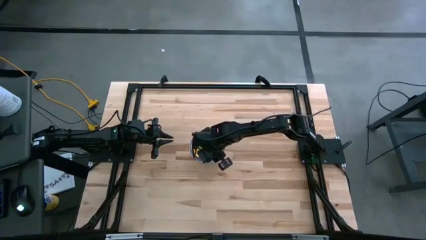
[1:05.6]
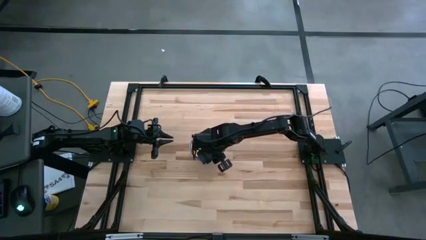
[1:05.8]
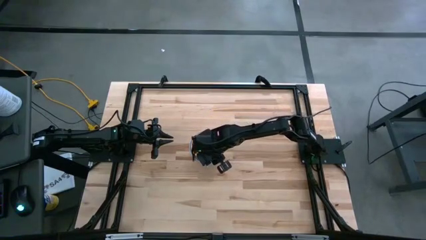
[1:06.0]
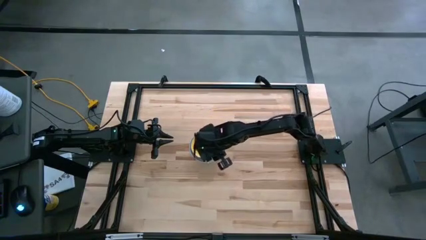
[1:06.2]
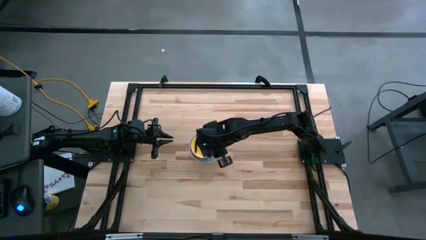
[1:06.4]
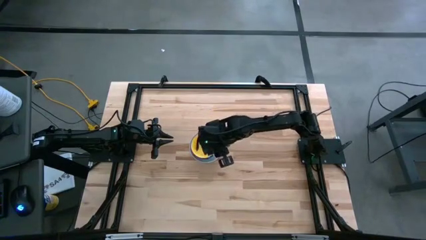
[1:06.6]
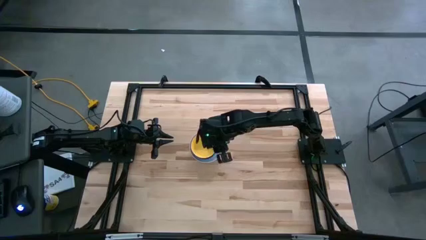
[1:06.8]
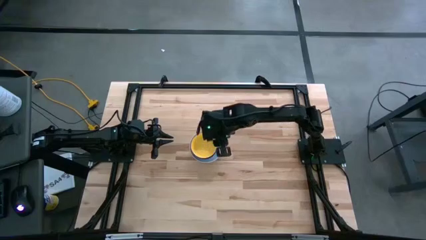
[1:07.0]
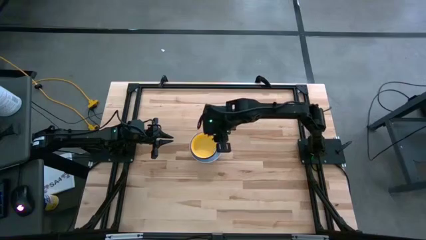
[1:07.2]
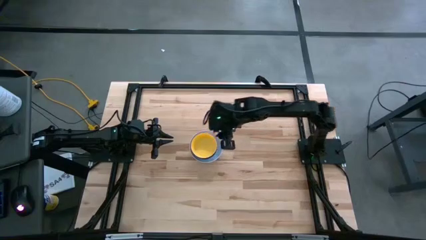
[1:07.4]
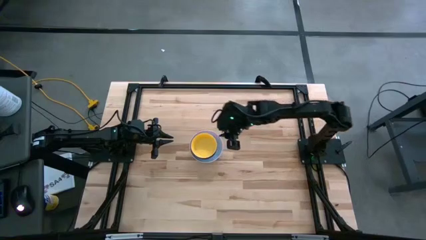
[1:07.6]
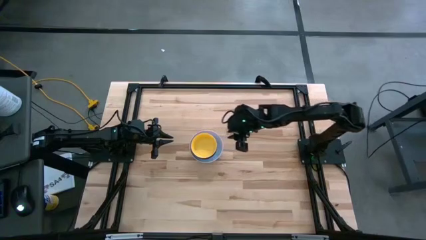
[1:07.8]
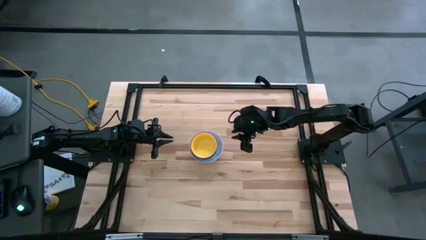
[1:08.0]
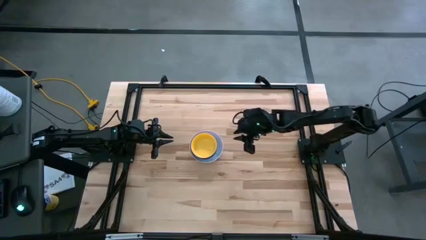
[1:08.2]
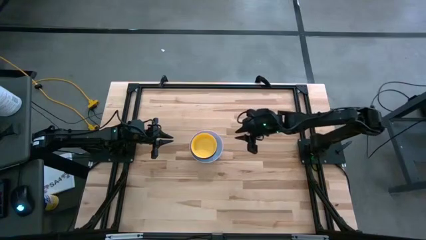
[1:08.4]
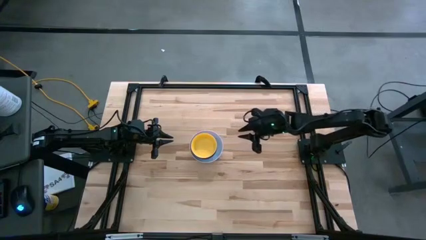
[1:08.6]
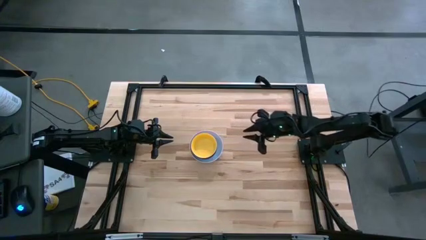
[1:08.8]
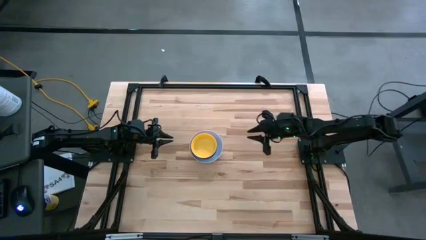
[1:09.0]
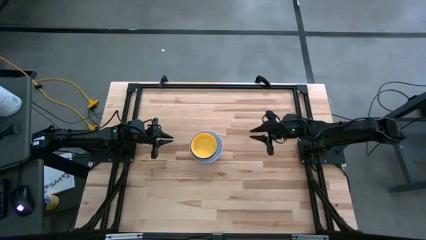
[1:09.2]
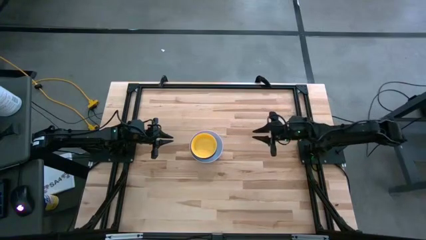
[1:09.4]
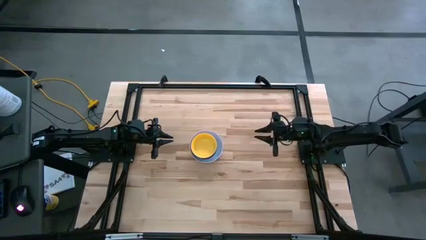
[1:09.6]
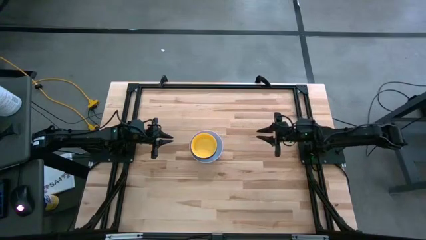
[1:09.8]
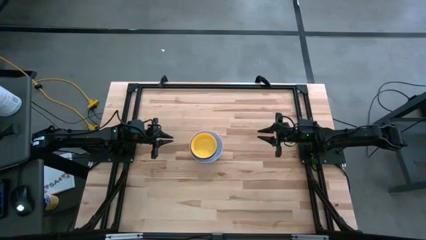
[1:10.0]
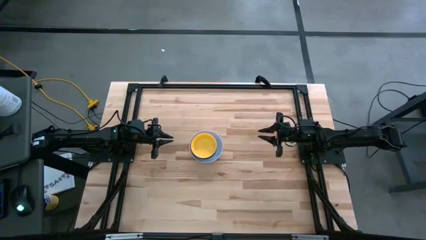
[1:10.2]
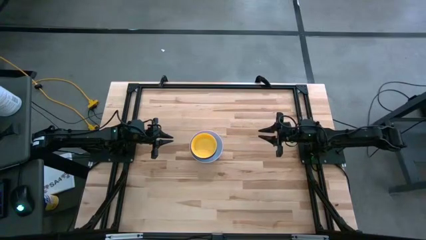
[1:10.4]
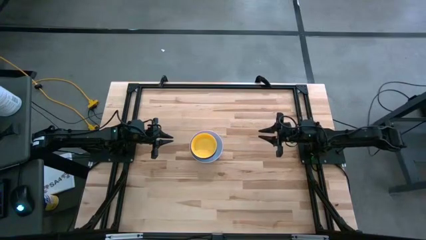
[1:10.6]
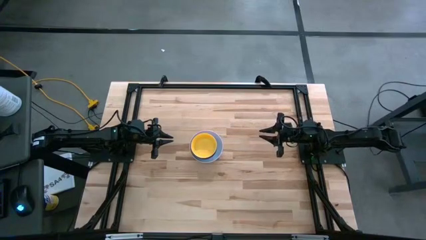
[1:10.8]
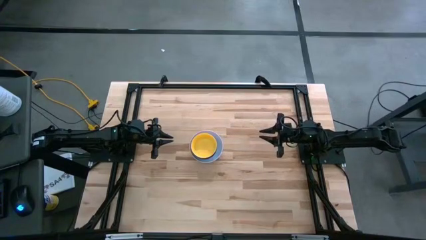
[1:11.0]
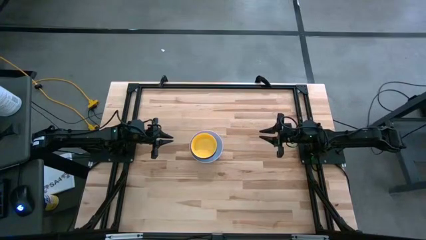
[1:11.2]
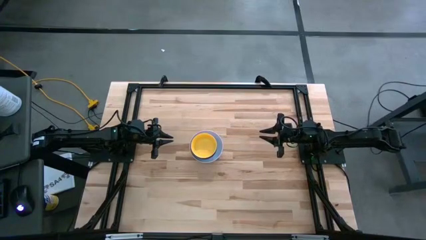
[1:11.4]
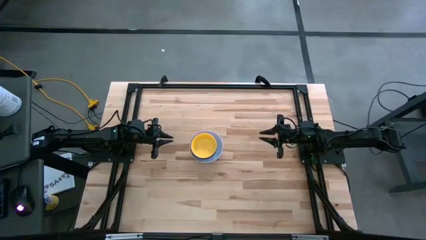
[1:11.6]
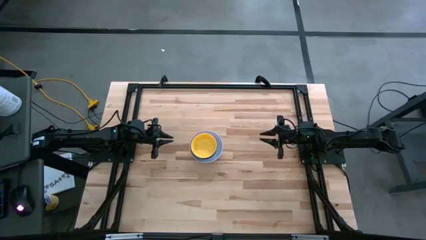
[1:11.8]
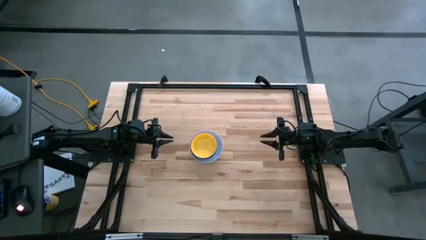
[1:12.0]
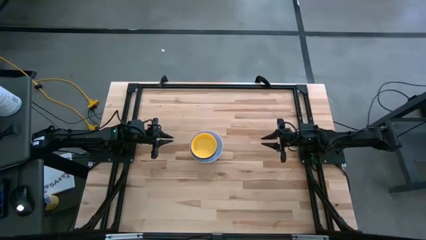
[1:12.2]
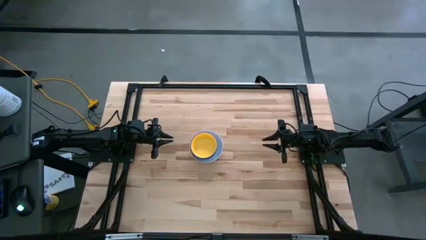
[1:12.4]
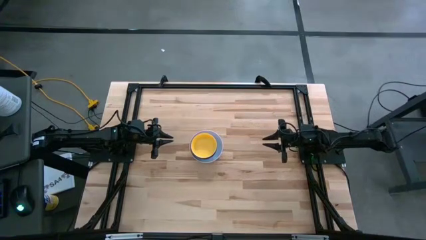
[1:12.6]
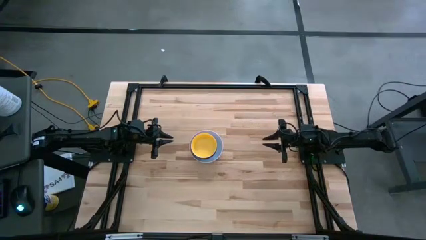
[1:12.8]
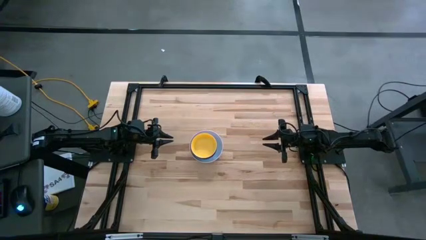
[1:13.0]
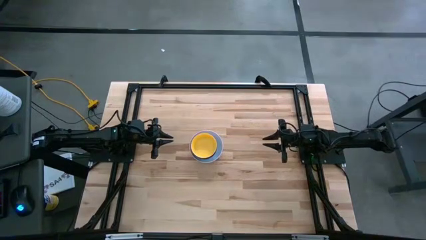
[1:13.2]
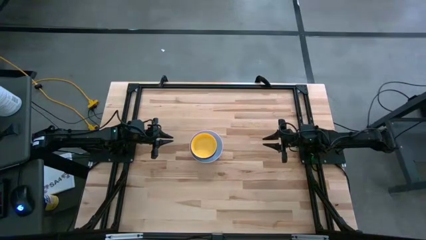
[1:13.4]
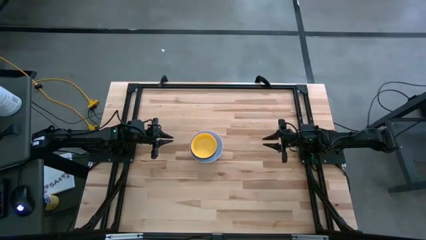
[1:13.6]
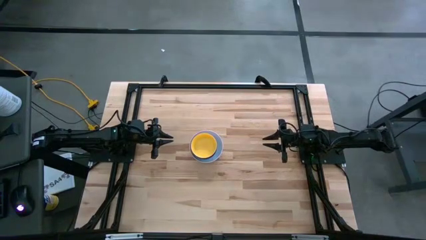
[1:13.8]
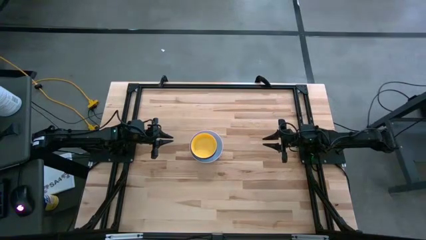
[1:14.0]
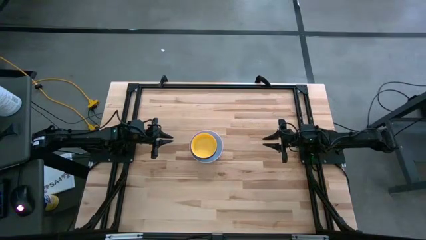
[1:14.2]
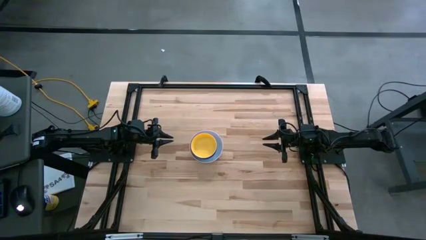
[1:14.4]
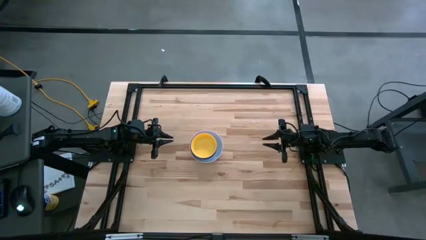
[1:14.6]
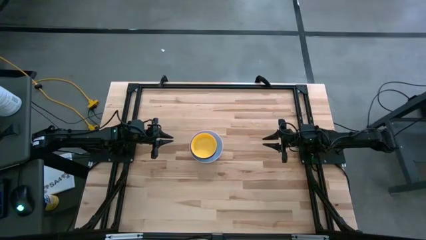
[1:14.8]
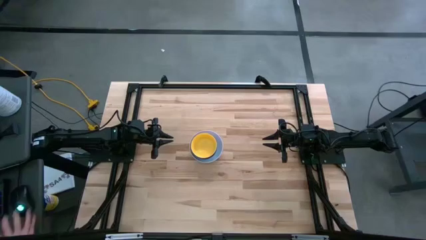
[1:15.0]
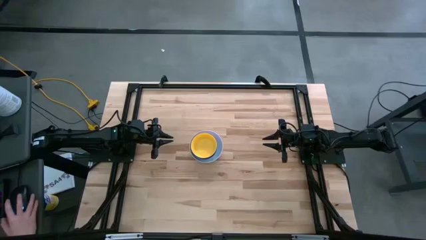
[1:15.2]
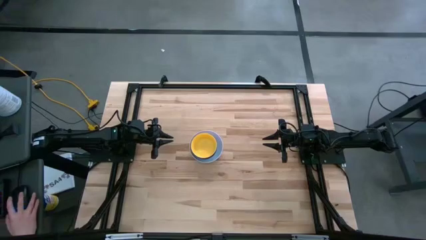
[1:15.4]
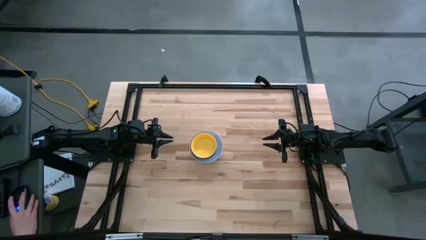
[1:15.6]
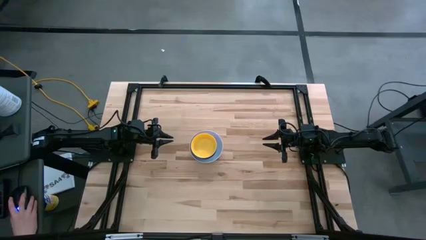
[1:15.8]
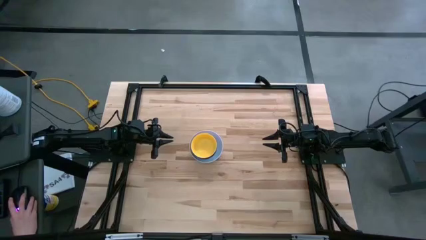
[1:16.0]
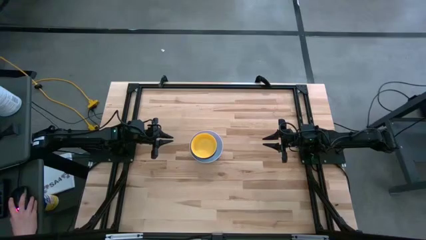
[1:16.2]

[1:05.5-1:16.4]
Return to Home Position

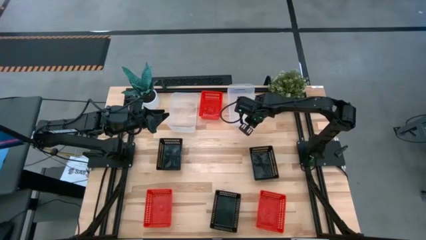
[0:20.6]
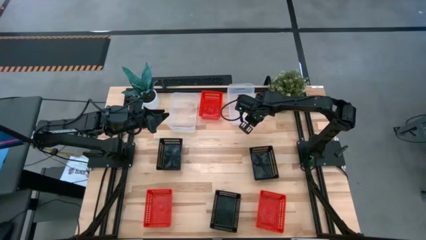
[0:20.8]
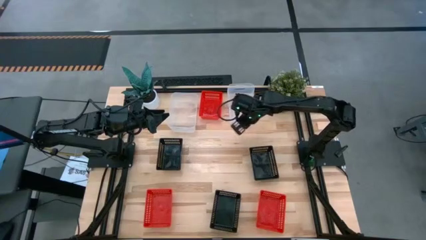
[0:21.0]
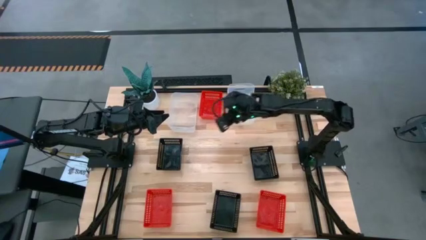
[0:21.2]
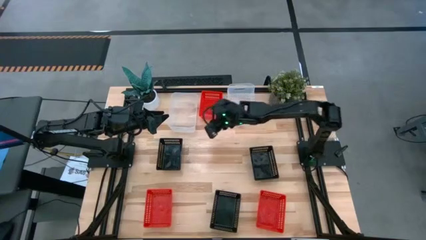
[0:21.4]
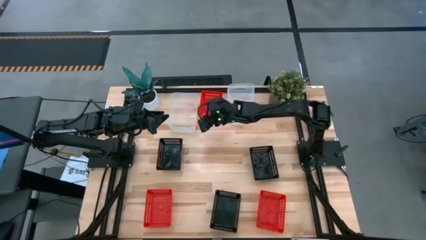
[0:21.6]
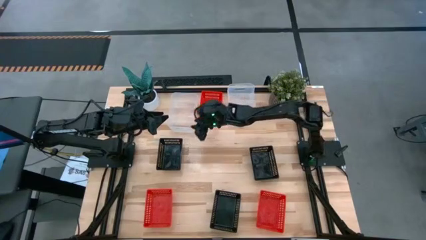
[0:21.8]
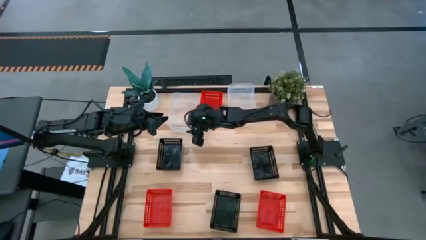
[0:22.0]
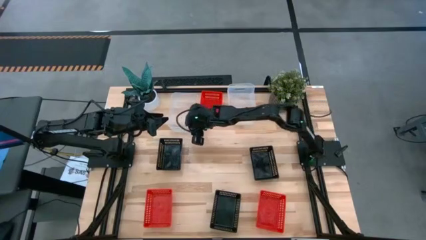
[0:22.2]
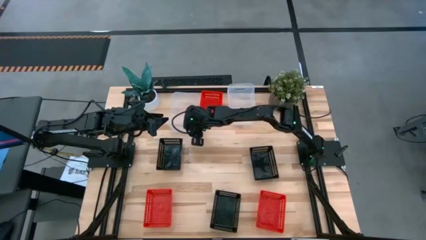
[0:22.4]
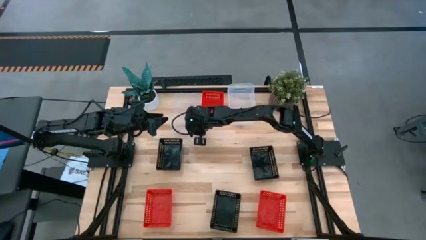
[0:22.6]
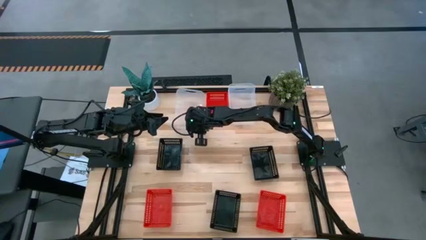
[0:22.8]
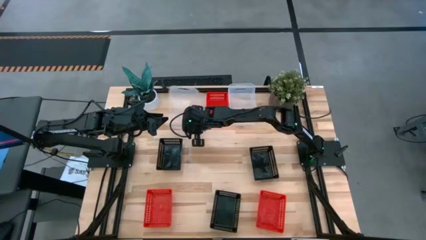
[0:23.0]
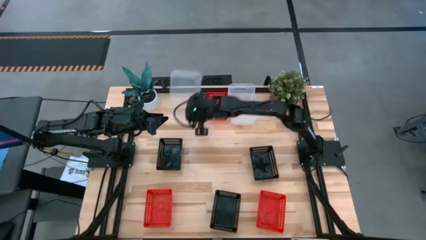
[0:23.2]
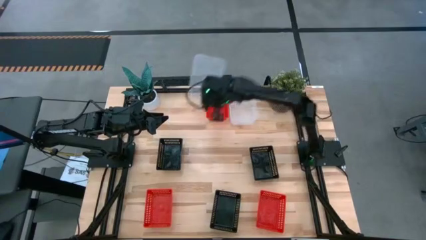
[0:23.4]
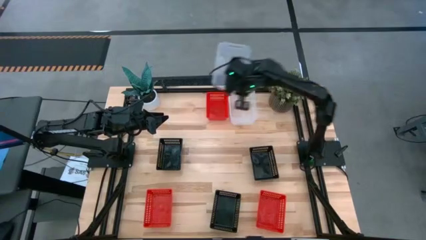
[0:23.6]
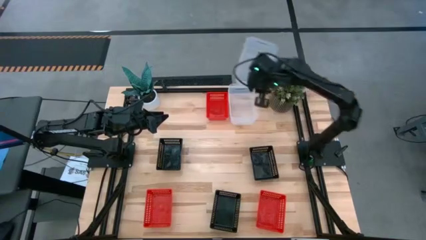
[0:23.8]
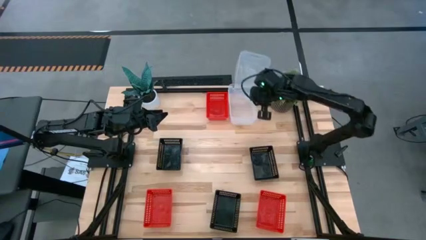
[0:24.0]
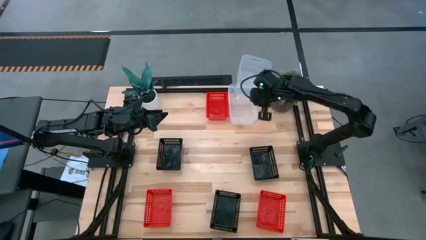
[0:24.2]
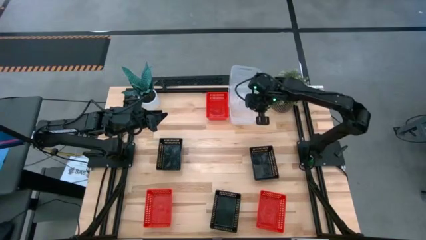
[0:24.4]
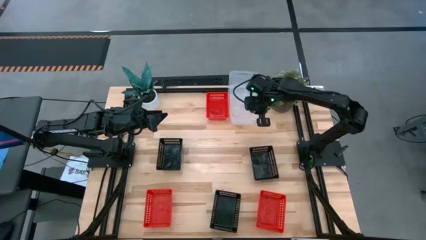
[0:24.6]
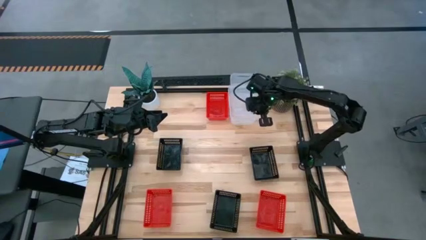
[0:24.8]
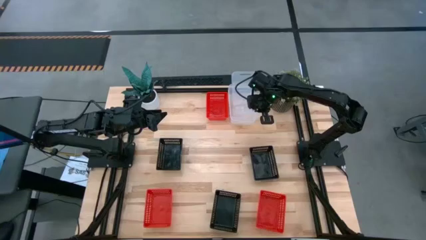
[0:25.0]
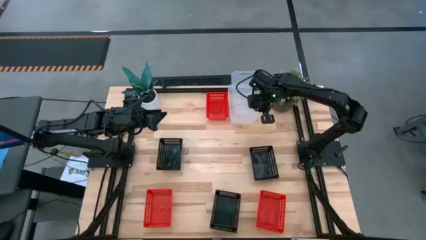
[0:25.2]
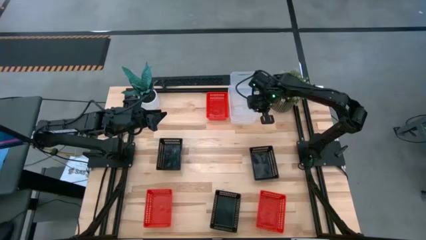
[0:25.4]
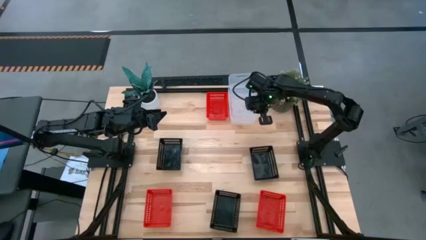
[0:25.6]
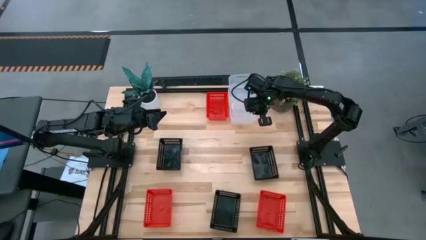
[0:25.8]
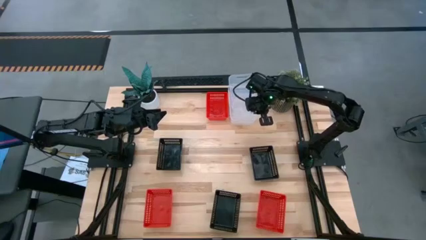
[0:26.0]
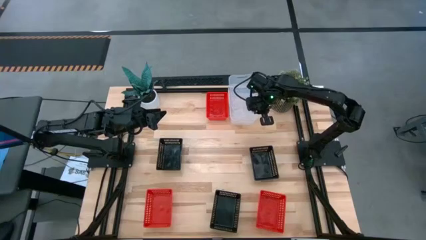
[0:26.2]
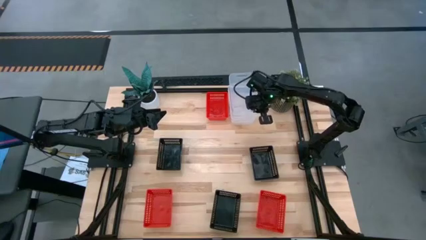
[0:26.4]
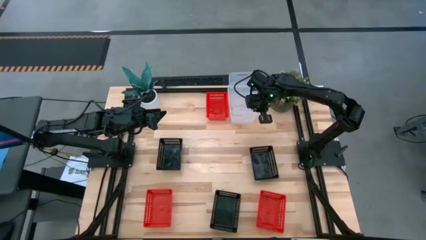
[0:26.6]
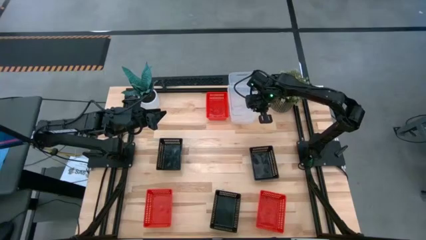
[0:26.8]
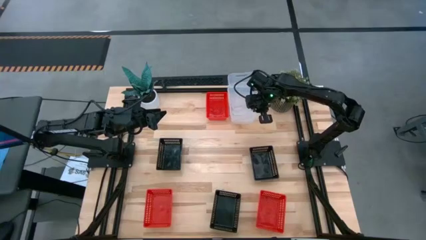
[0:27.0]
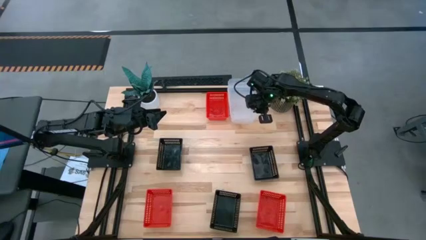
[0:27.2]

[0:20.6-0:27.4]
Stack the left transparent bin on the transparent bin
